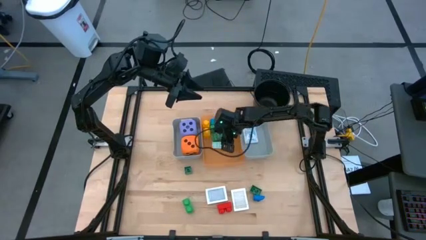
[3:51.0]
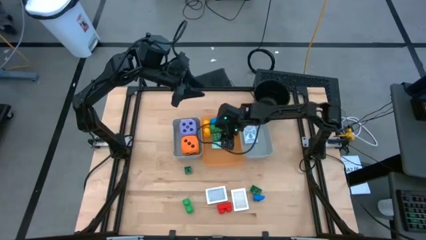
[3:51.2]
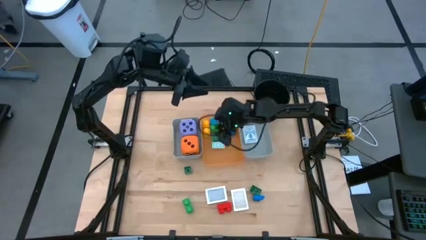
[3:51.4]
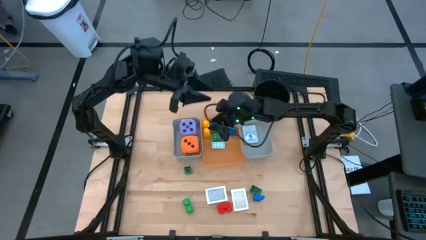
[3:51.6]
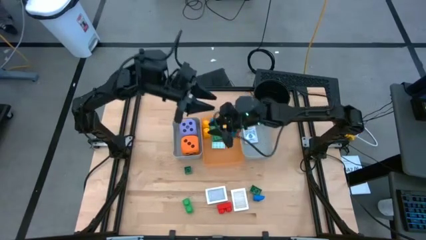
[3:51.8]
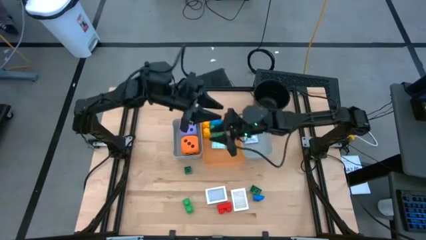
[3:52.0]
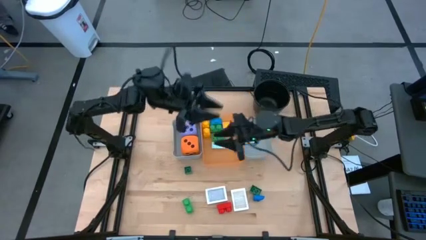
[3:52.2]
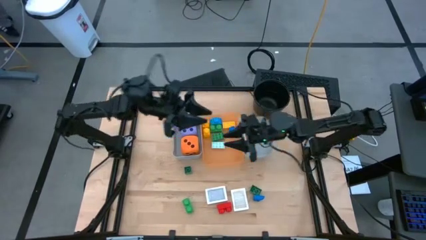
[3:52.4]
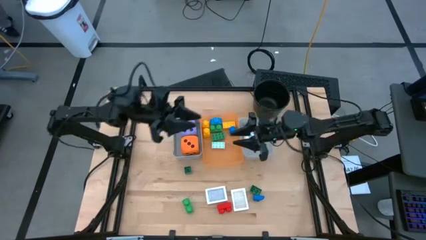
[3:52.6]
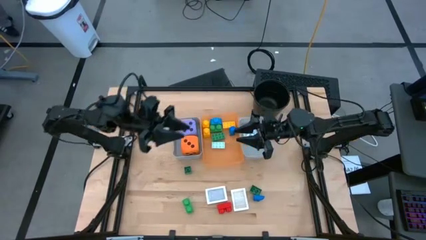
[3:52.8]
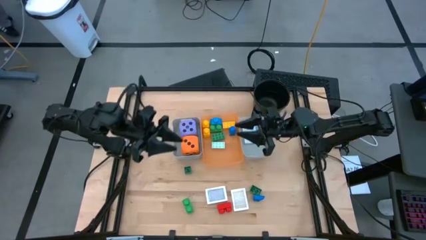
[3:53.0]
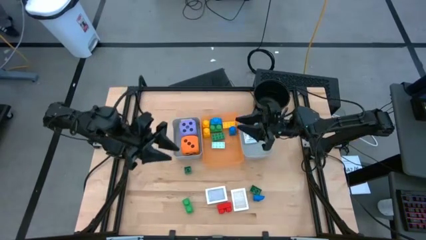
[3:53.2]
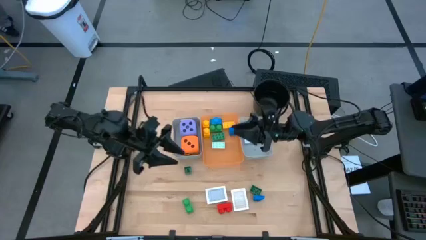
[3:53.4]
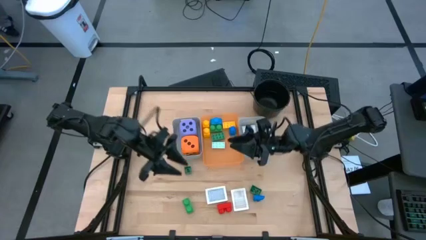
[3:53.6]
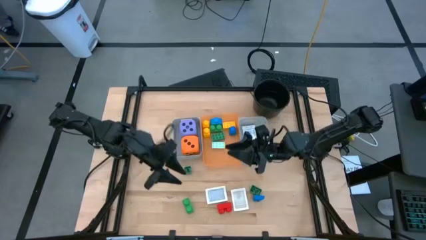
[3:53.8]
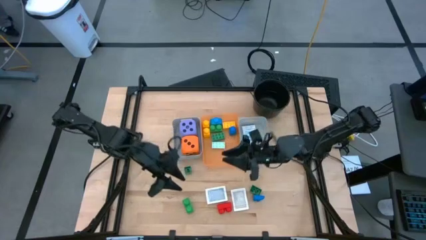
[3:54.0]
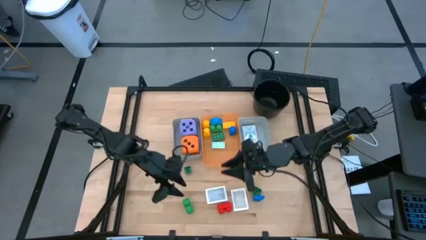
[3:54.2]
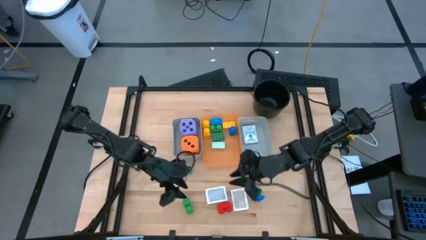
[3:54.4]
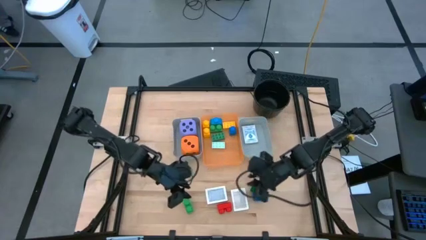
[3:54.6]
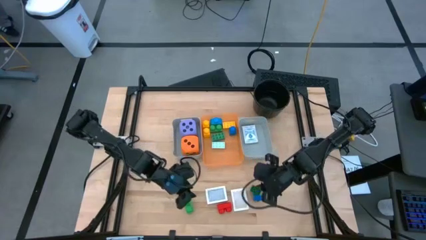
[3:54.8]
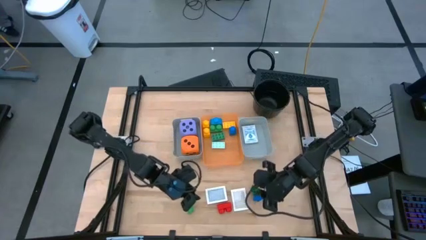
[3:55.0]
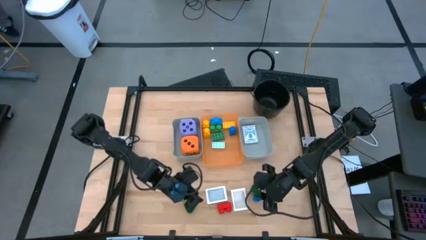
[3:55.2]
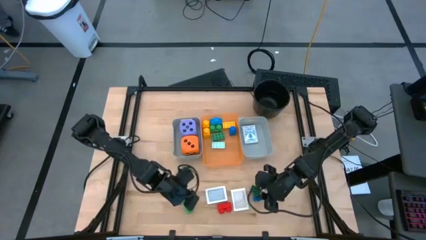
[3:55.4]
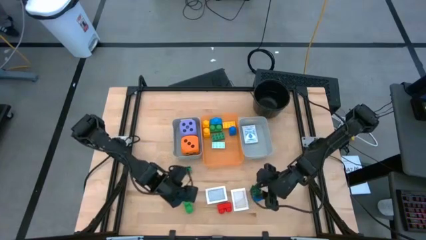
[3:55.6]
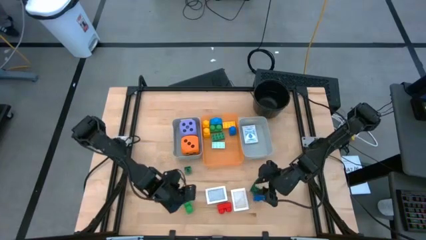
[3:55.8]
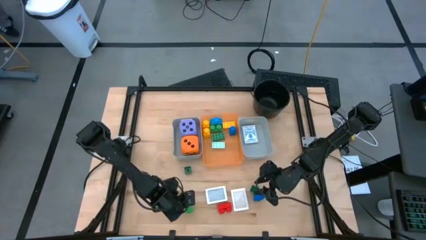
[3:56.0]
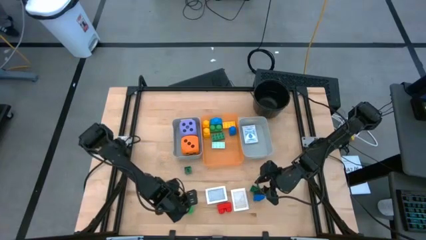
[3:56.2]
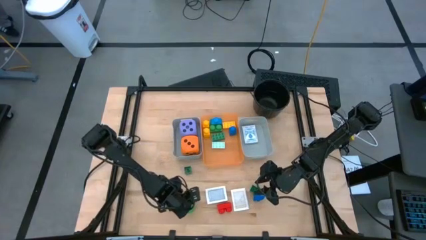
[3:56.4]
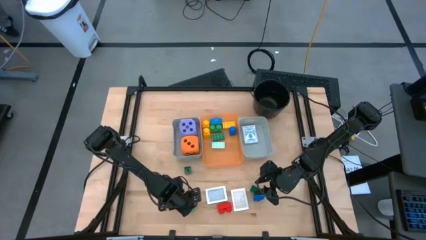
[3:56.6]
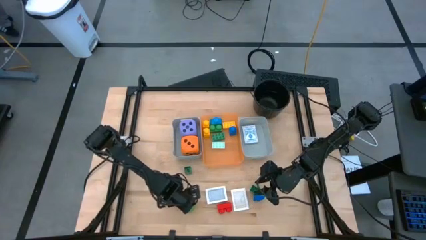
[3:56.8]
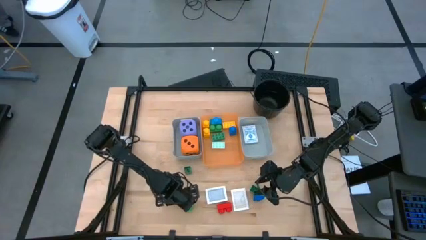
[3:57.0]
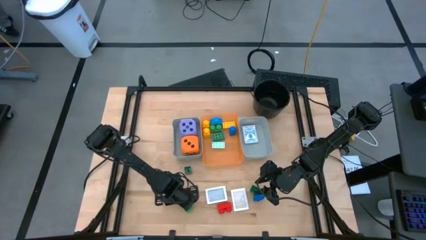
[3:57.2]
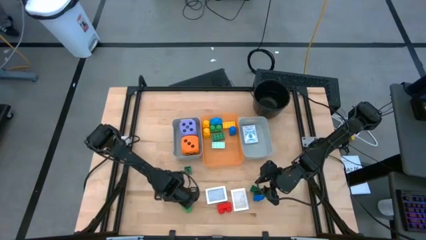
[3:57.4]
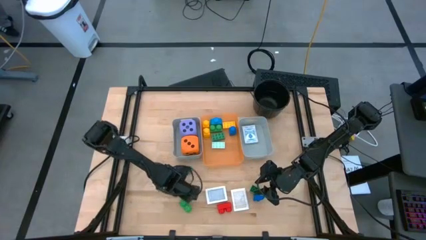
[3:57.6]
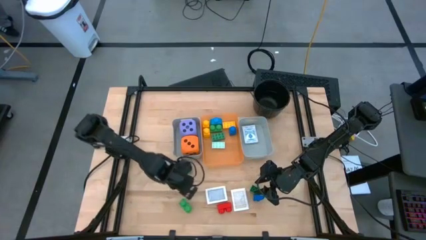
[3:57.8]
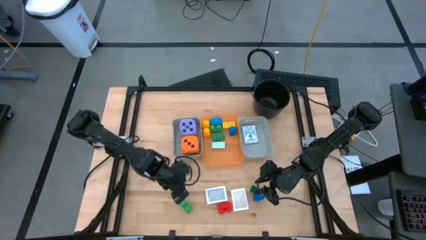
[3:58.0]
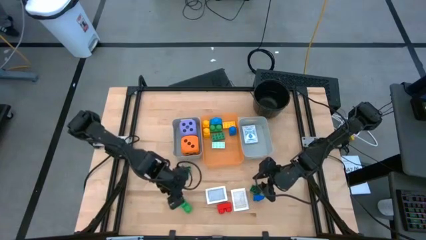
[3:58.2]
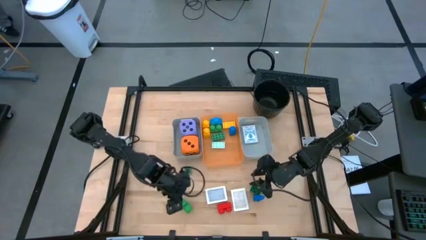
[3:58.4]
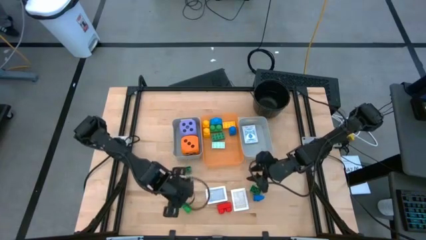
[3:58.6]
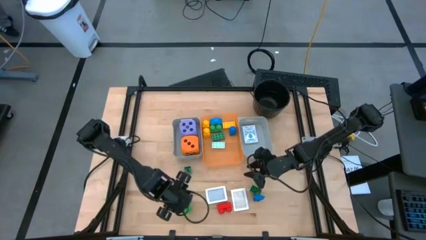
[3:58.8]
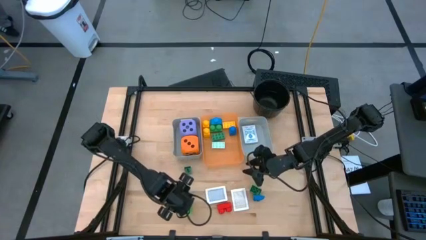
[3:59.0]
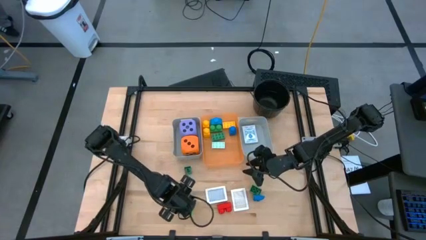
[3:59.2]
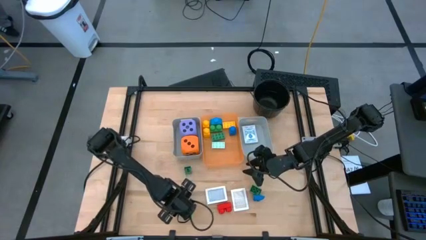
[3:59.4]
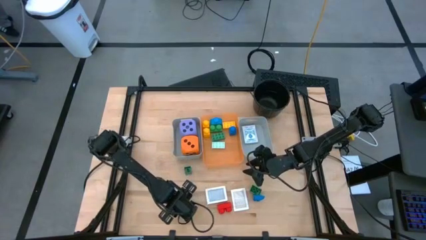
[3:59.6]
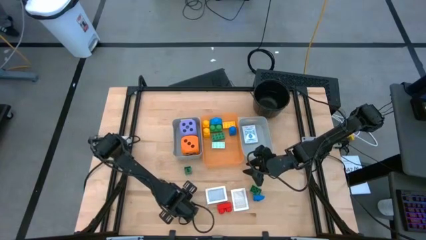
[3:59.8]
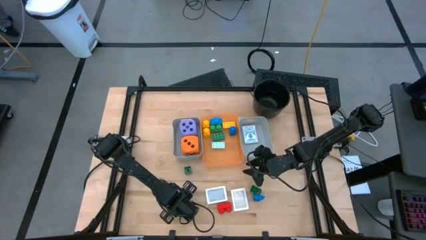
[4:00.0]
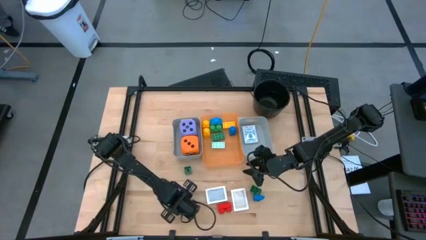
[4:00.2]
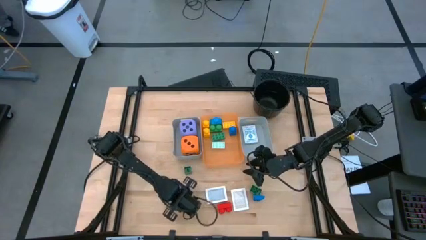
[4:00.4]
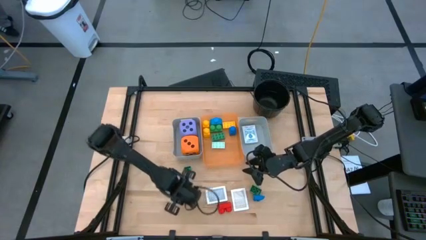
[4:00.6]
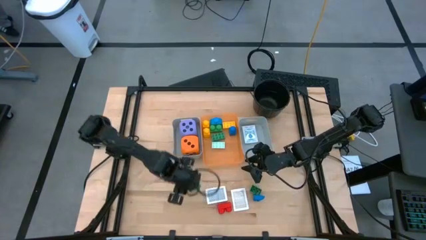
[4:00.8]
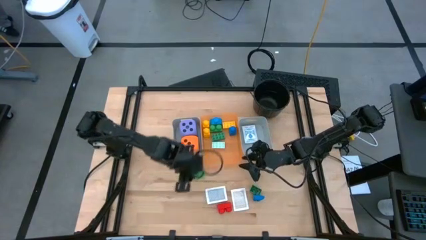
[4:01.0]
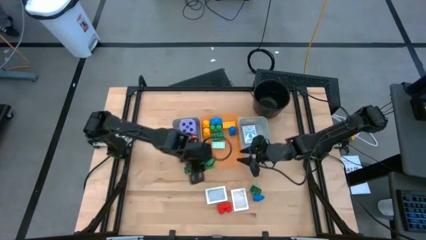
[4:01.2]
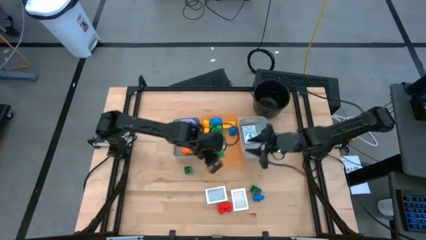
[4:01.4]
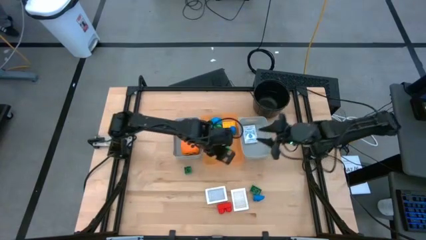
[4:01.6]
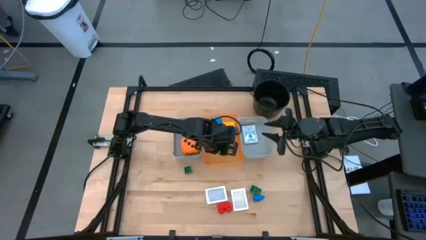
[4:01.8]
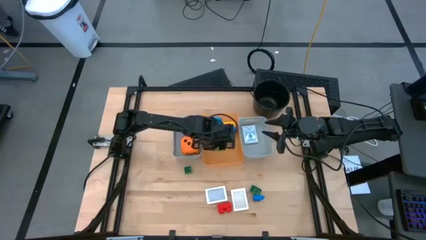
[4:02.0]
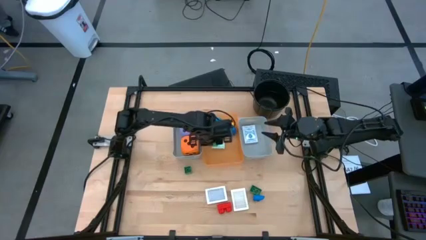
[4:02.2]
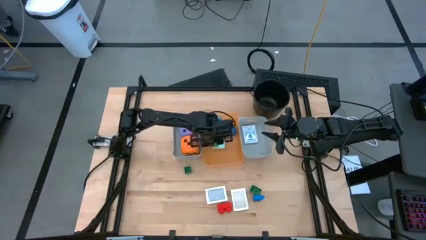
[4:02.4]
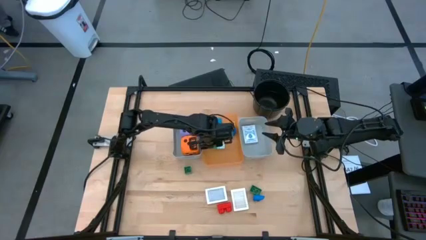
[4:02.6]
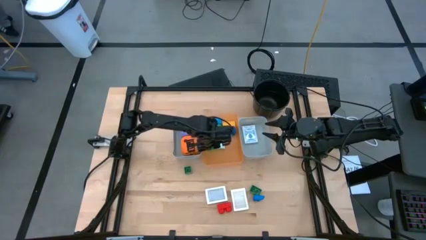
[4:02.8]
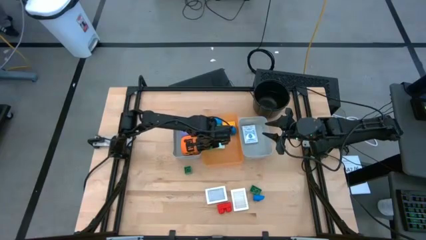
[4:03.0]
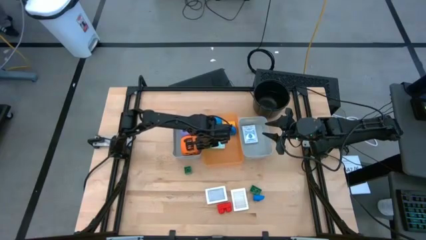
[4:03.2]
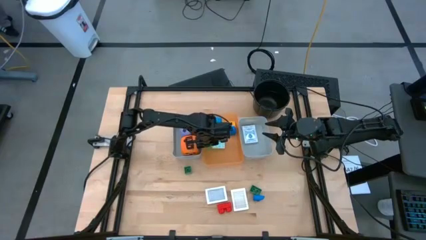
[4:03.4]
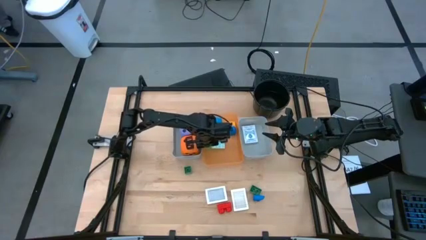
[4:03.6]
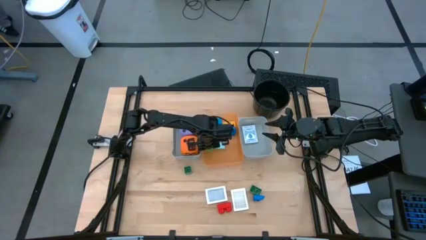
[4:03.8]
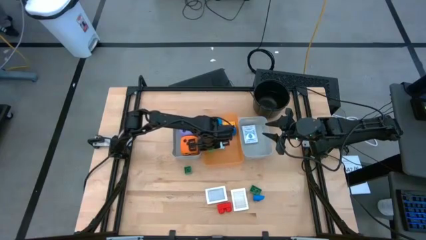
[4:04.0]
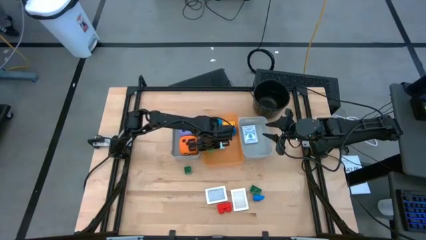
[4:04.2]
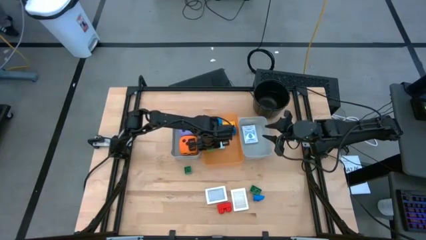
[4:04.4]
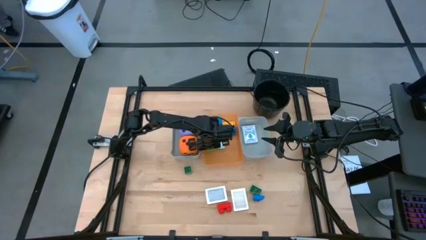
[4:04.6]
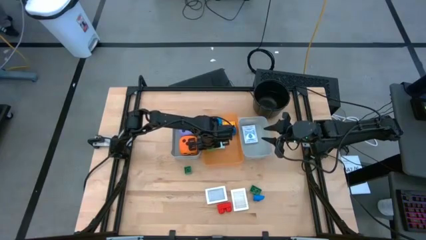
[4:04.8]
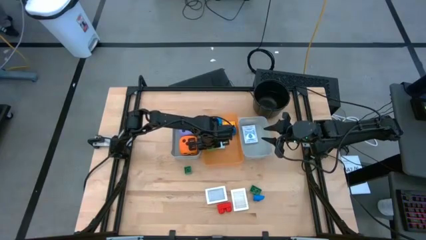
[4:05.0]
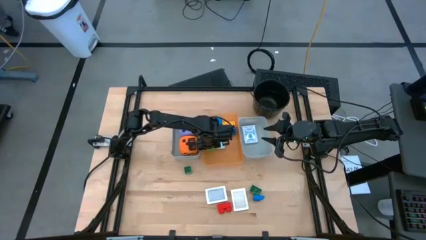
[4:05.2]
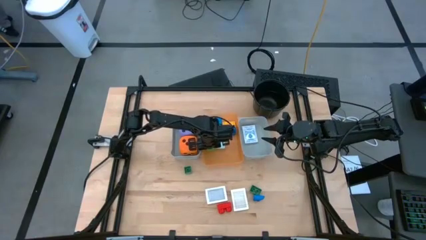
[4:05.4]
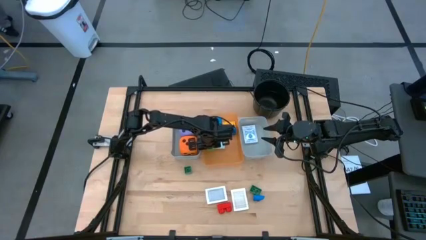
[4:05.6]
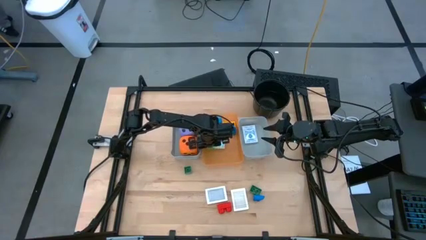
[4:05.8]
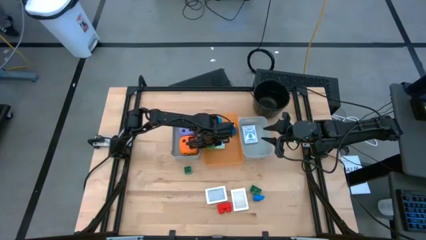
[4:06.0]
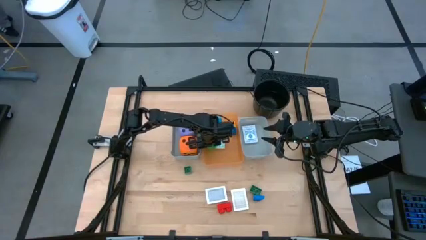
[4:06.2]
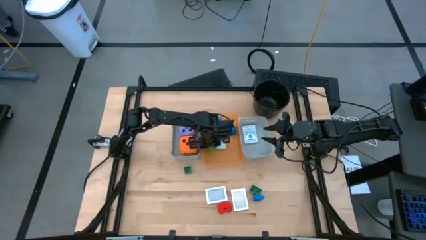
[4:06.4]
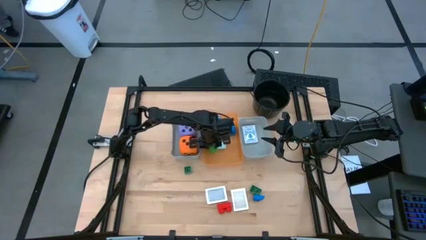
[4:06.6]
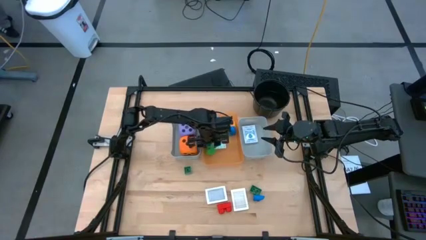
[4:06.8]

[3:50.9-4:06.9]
Task: Pick & Place Toys
Put the green game piece into the orange bin
